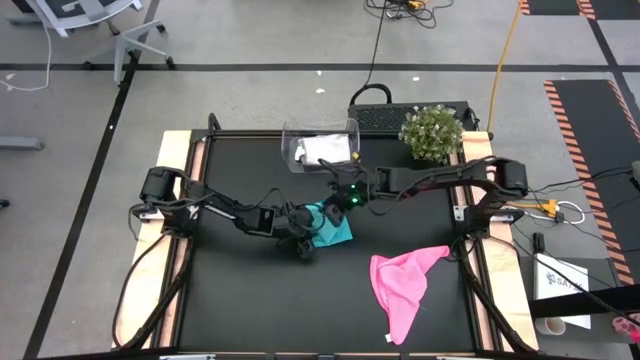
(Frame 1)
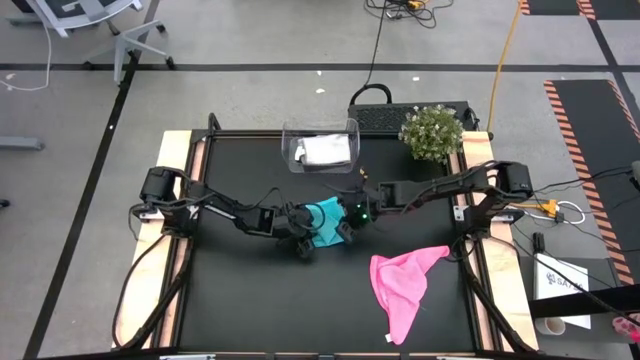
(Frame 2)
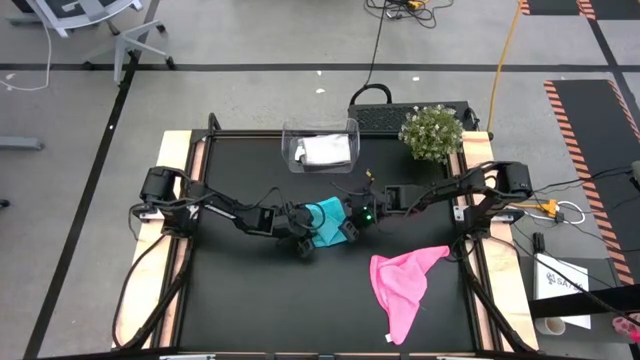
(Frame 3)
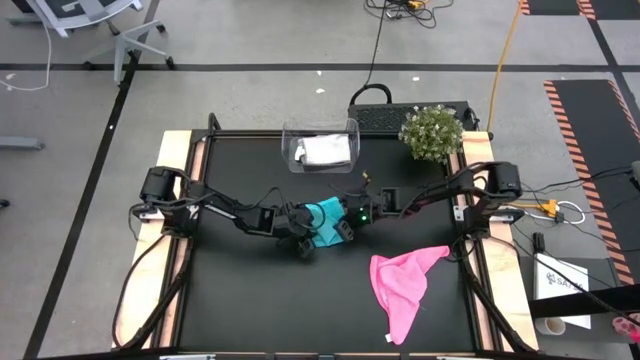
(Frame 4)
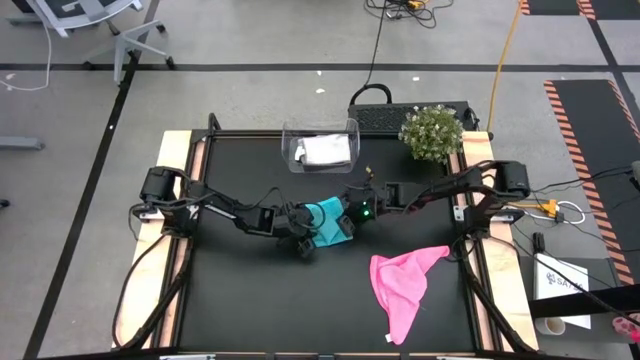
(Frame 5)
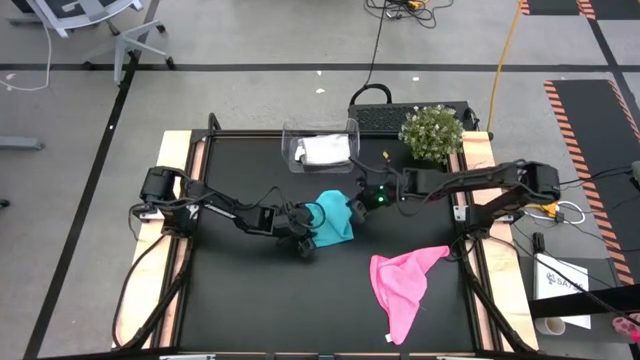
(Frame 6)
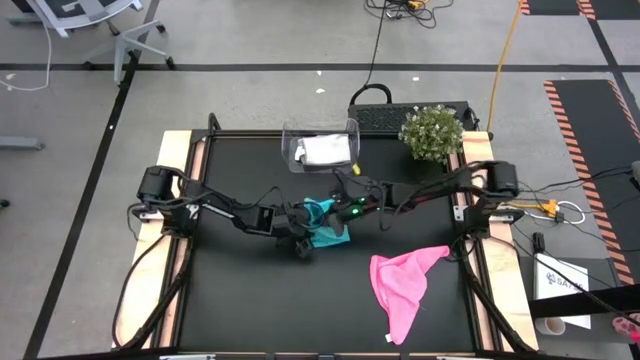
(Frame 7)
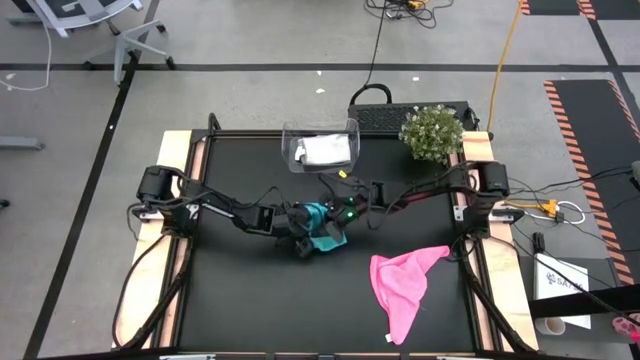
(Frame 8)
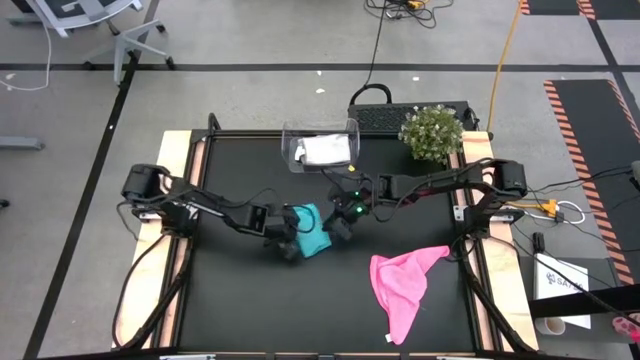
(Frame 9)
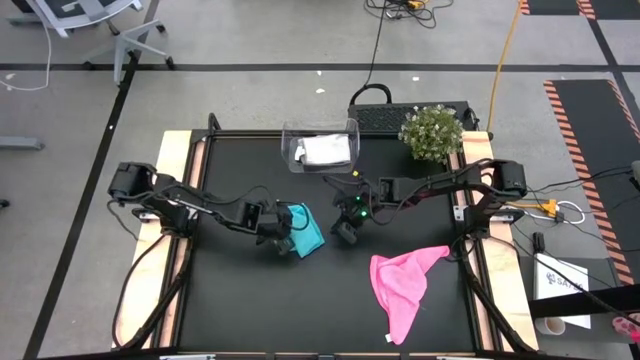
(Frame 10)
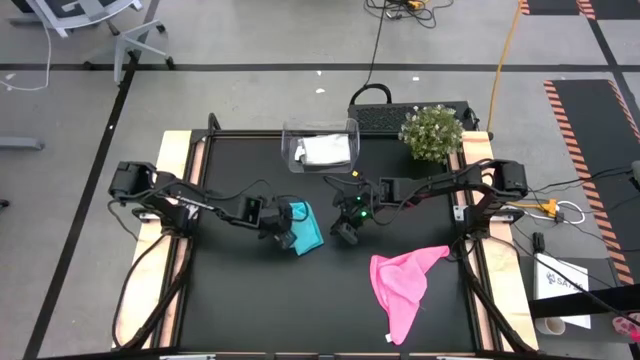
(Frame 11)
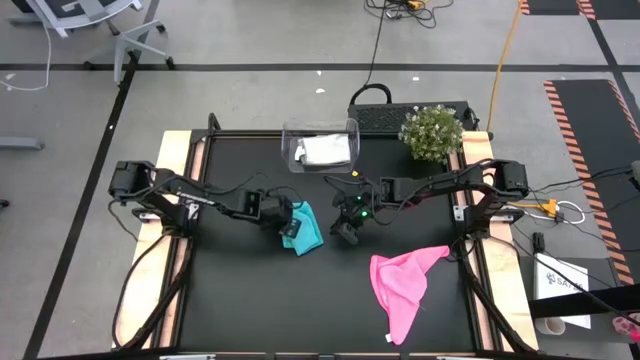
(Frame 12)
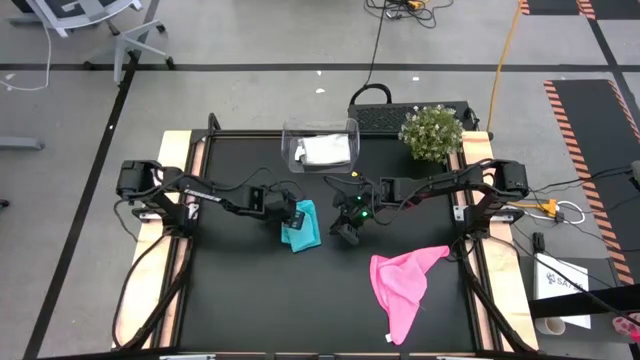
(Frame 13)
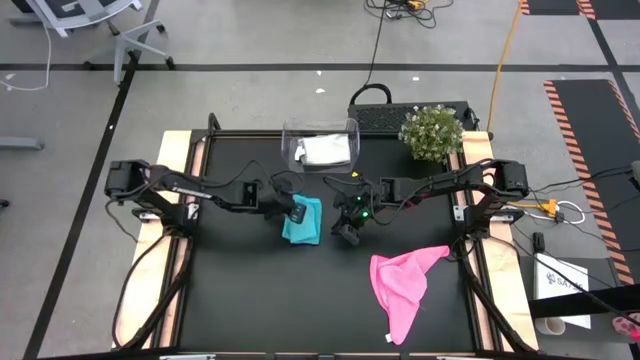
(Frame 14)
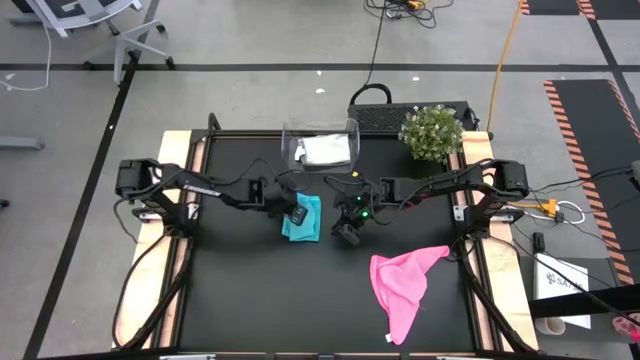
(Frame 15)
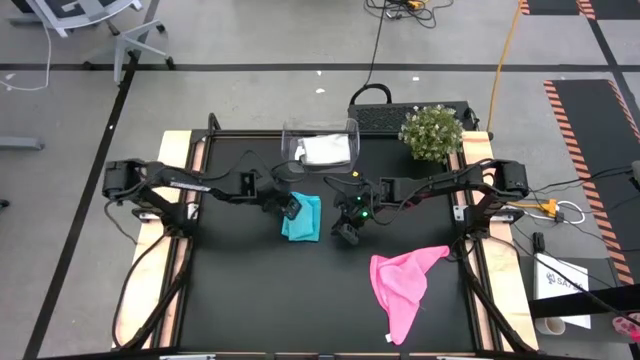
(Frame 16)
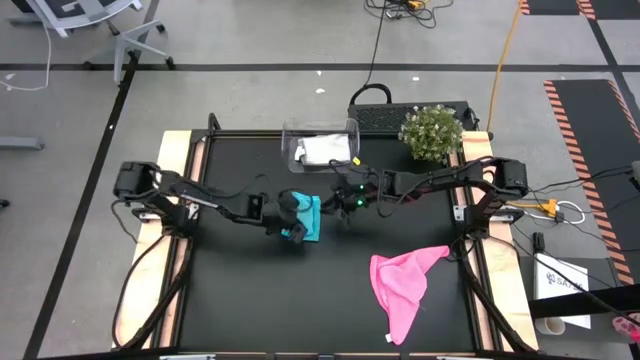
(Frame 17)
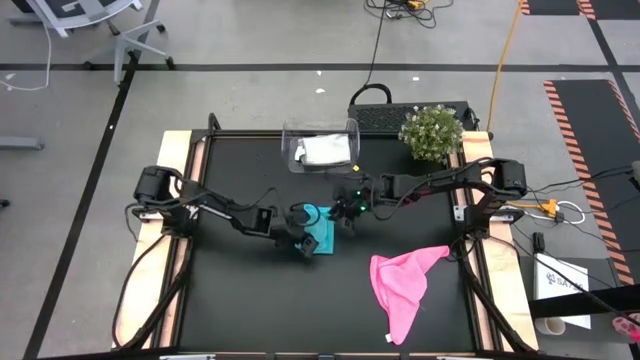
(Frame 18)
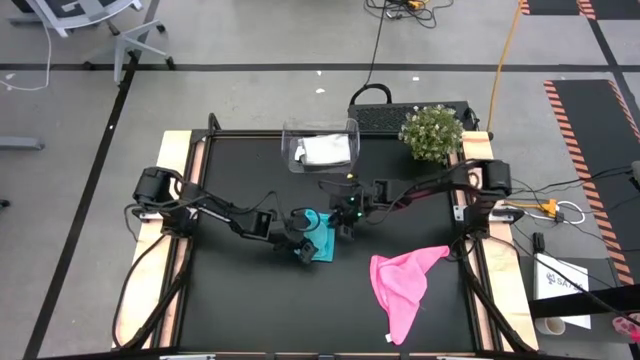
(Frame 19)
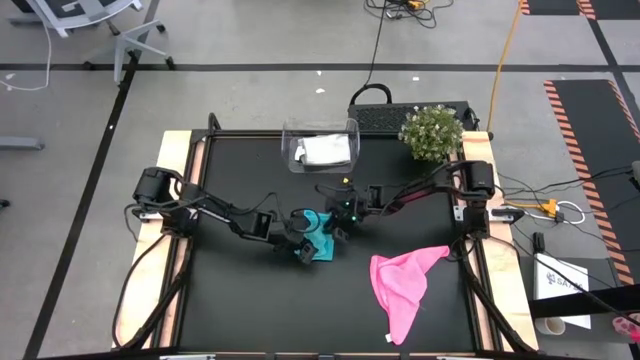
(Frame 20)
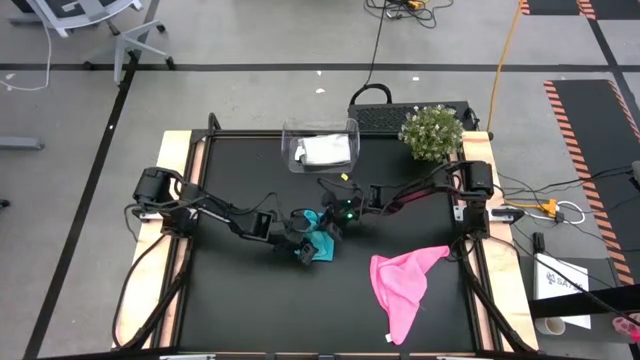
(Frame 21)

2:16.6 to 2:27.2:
Task: Fold microfiber towels
Fold the light blue microfiber cloth

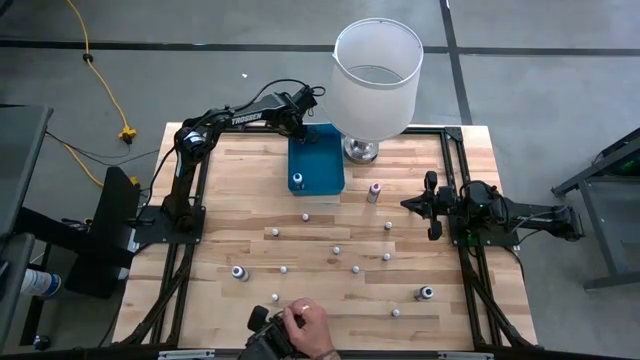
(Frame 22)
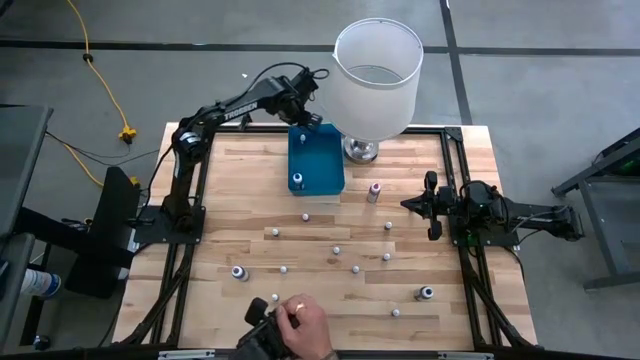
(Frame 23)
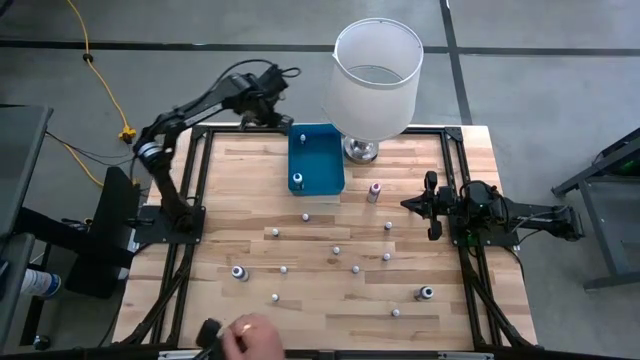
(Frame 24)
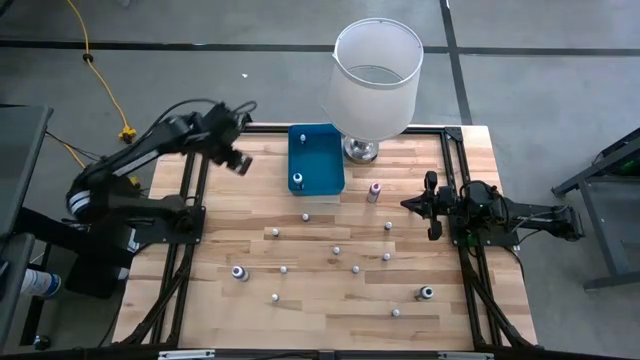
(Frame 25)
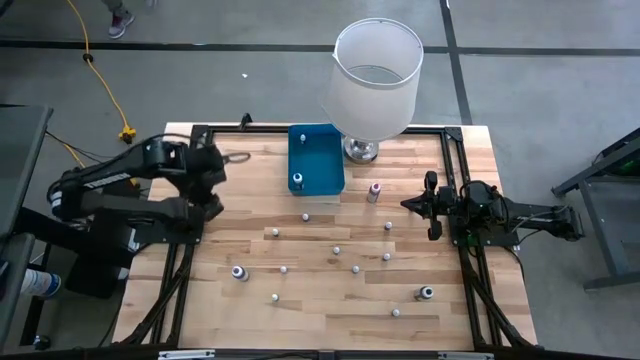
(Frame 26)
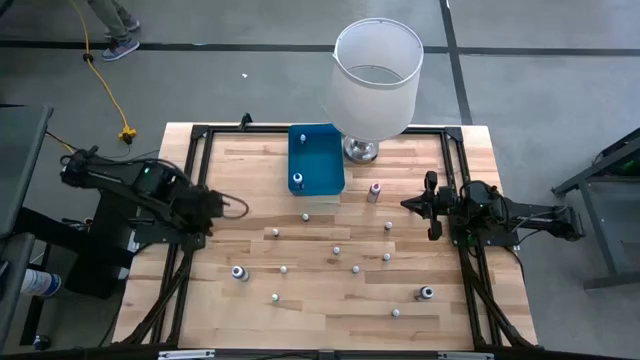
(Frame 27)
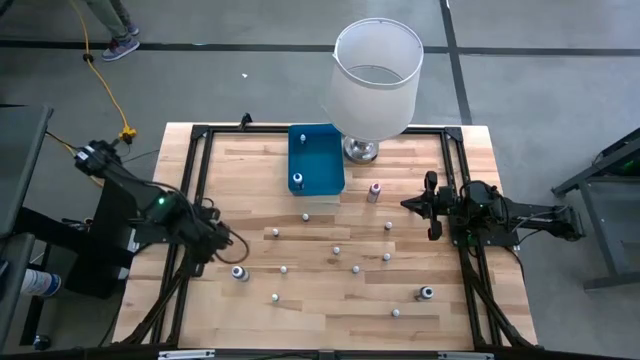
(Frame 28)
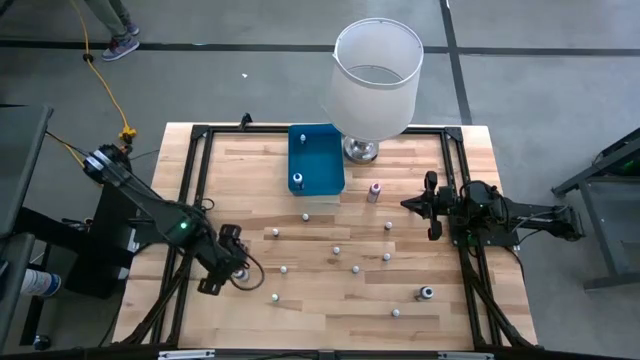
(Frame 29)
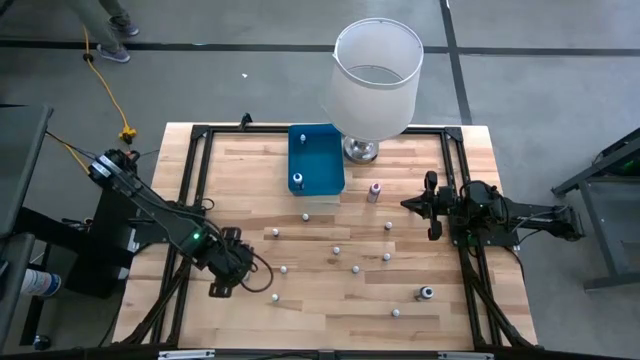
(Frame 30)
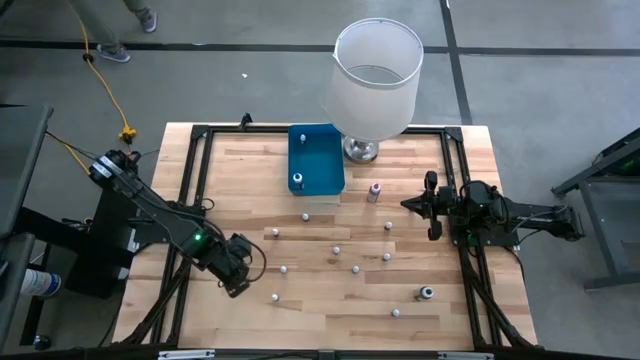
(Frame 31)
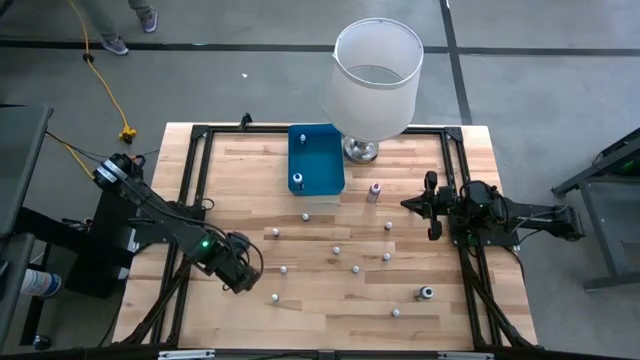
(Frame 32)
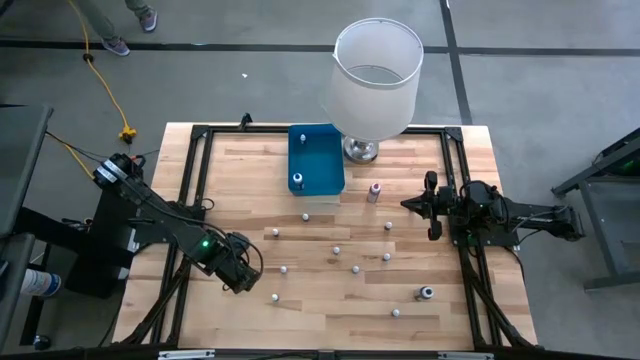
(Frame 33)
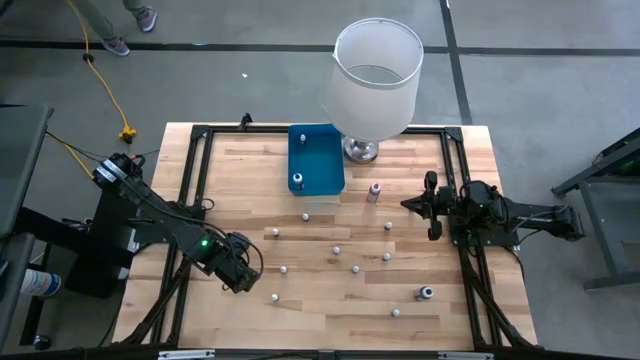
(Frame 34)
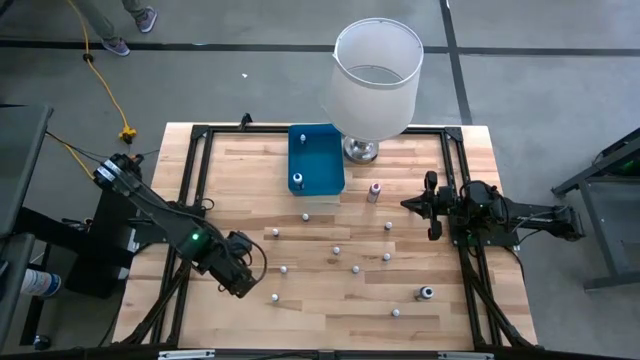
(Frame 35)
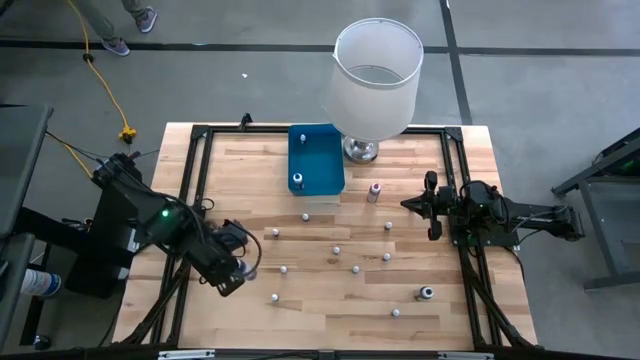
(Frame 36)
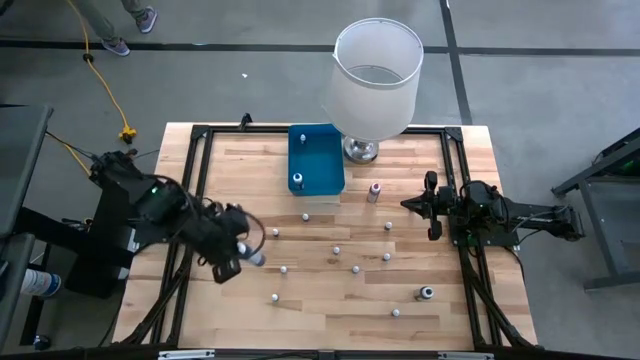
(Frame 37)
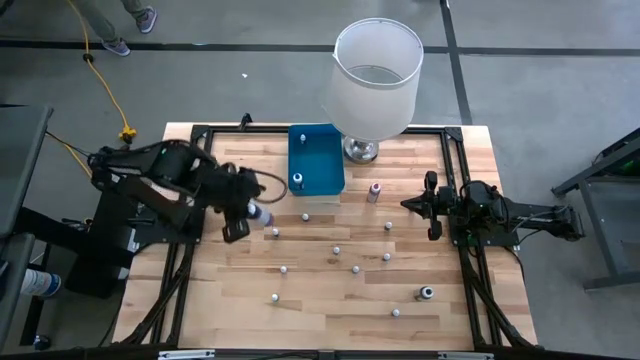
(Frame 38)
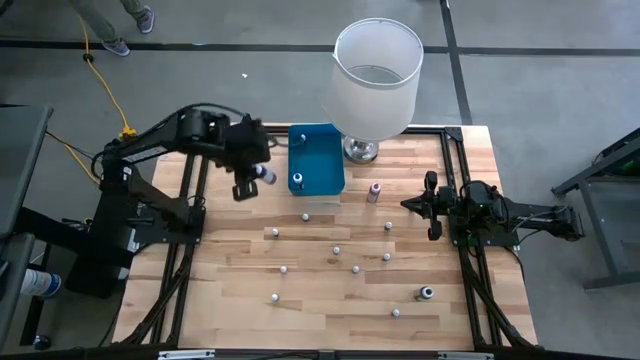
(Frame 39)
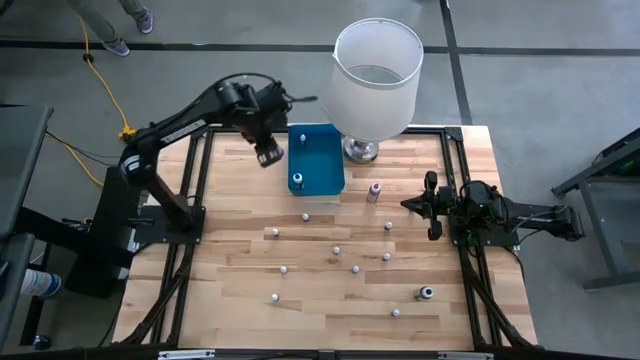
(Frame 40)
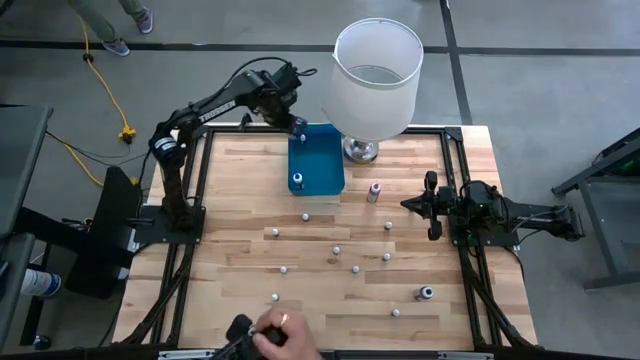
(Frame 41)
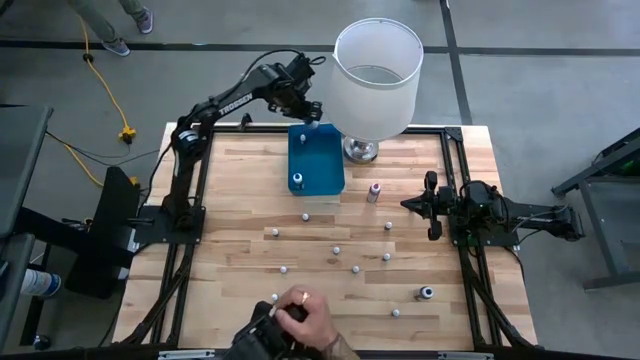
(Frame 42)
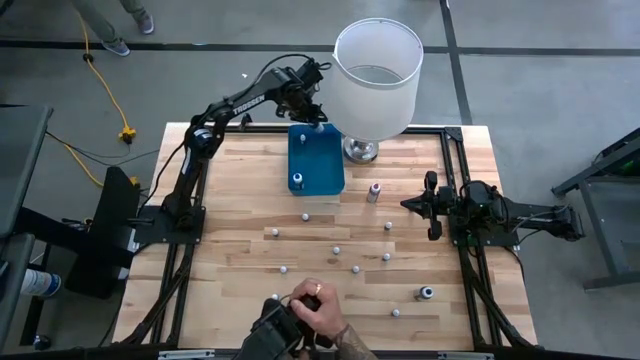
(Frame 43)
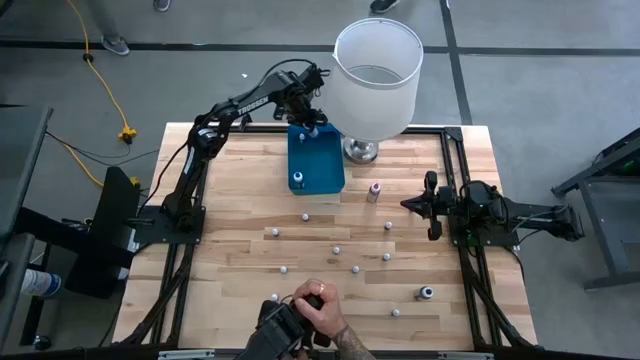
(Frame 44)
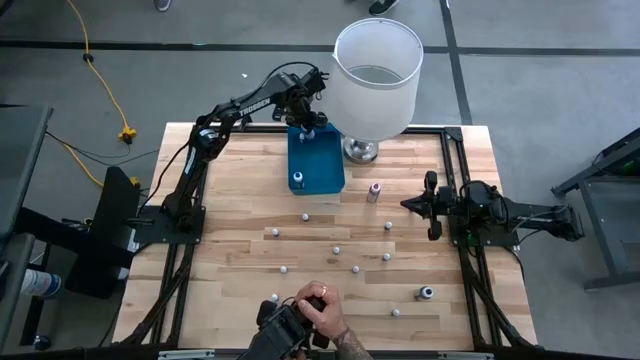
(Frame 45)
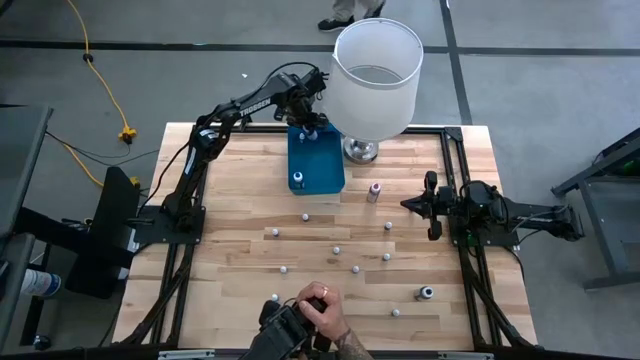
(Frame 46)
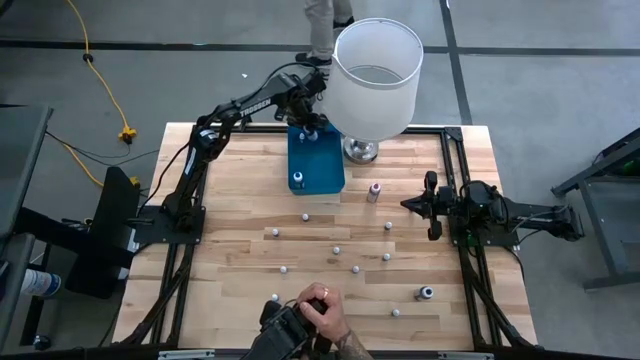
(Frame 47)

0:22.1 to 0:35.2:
Task: Pick & Place food coloring
Put the big purple food coloring bottle into the blue bin
